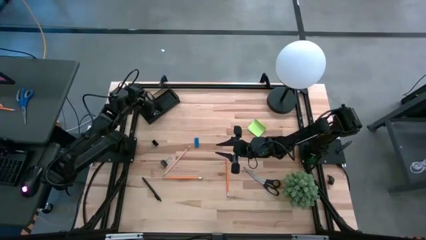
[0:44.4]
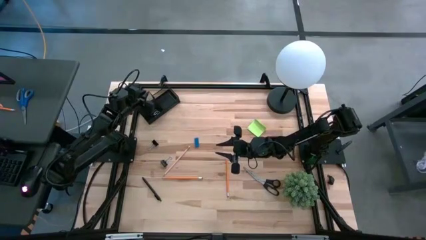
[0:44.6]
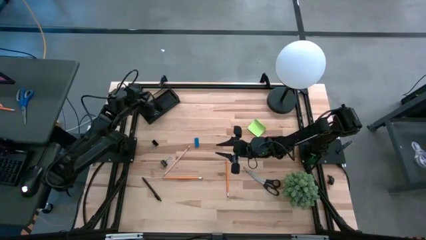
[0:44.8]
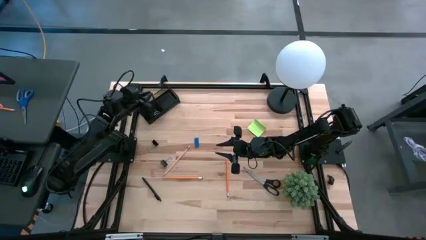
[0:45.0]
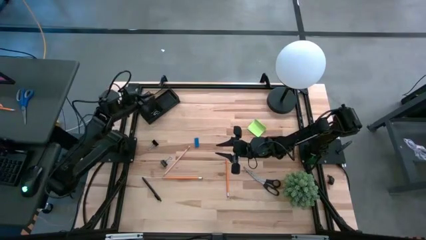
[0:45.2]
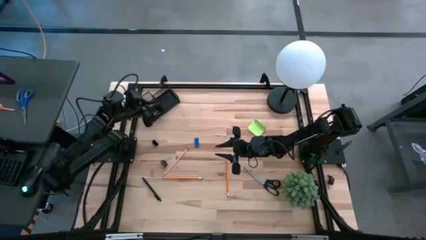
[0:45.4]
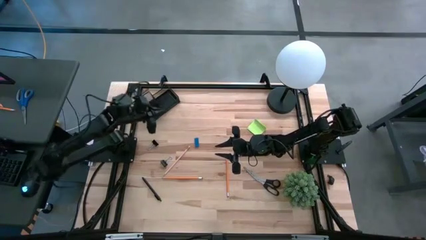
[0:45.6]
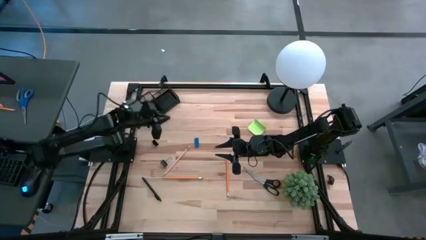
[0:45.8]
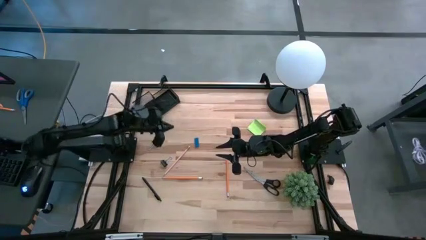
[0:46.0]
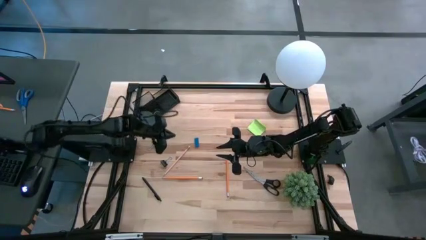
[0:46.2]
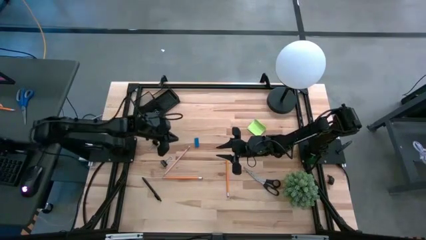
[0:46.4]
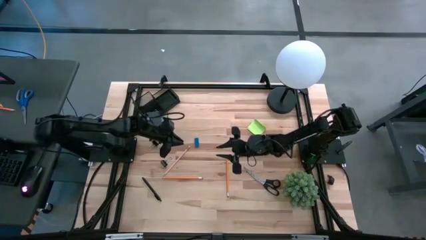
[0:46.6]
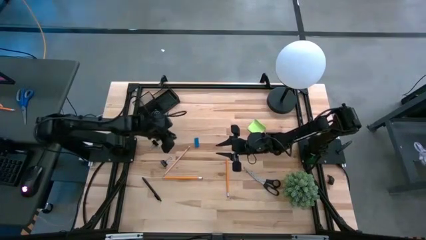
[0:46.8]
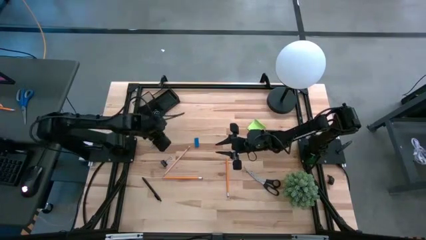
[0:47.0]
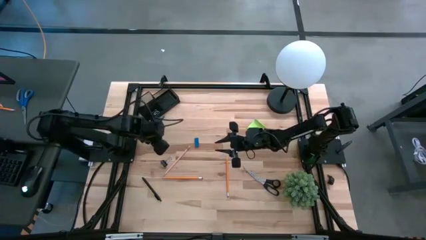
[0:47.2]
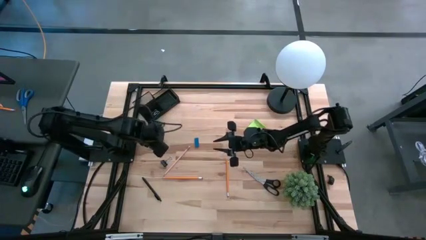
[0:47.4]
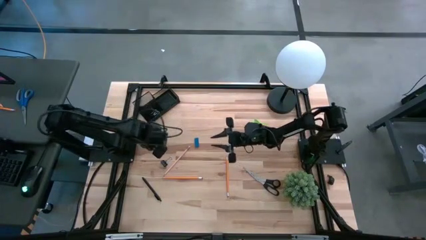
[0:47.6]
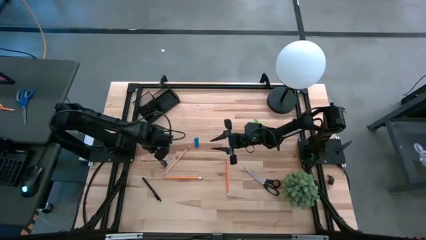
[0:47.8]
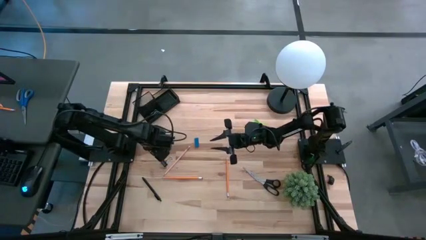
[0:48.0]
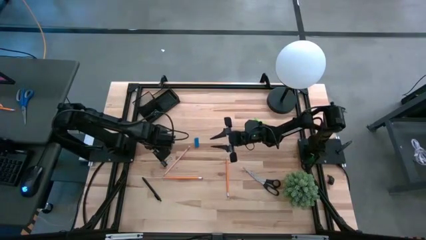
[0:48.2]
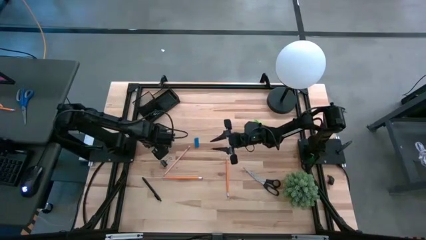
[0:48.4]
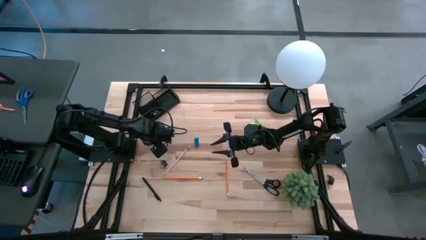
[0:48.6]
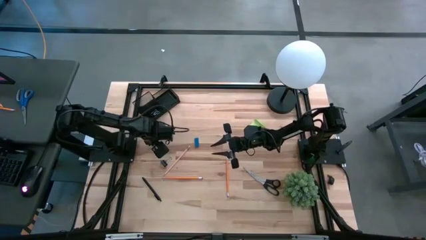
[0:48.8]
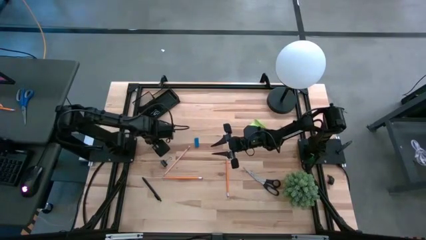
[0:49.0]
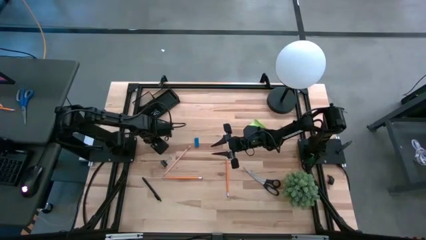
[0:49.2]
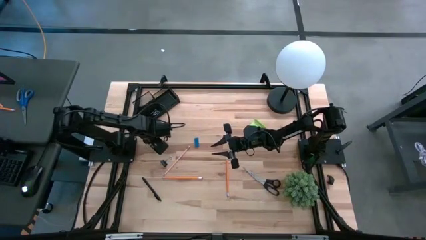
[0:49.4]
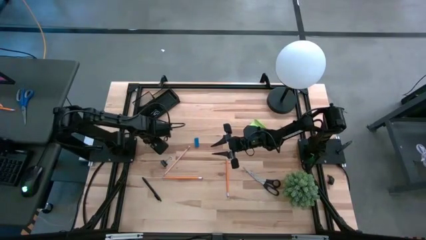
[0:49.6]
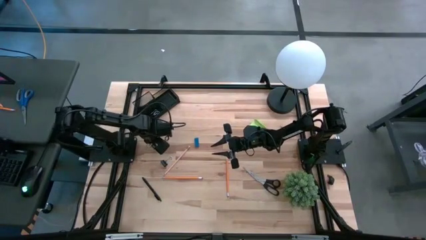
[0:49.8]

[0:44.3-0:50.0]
Task: Pick and place office supplies into organizer
Put the black binder clip into the bottom left section of the desk organizer

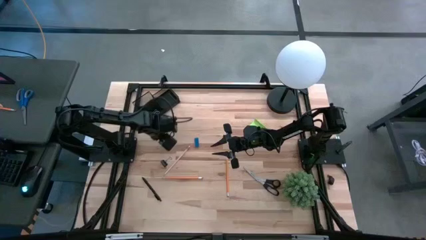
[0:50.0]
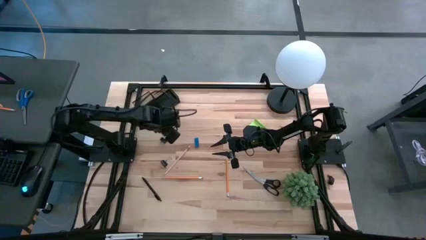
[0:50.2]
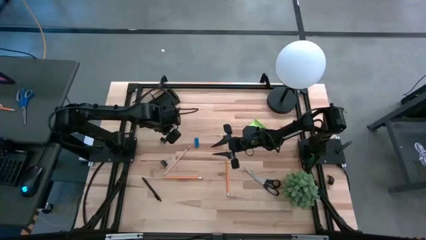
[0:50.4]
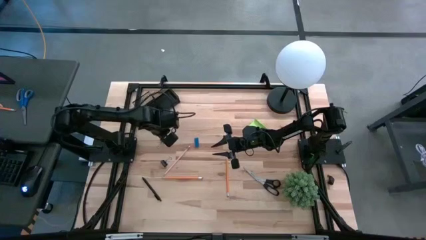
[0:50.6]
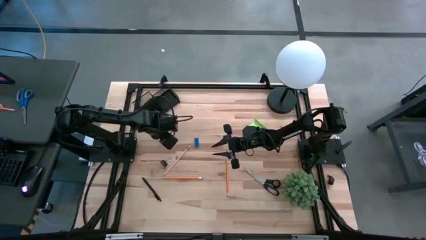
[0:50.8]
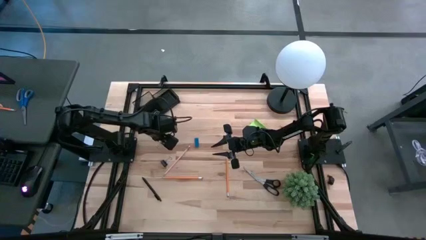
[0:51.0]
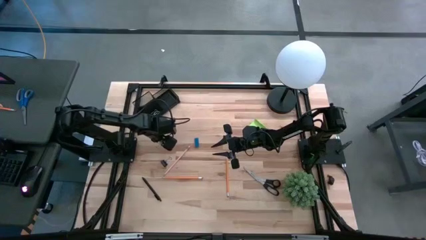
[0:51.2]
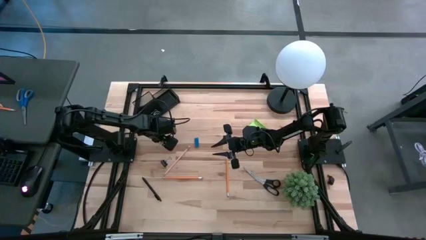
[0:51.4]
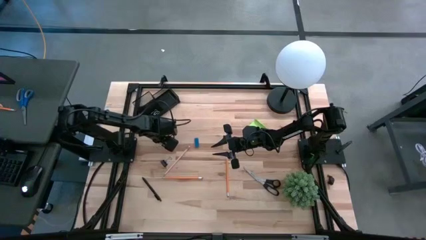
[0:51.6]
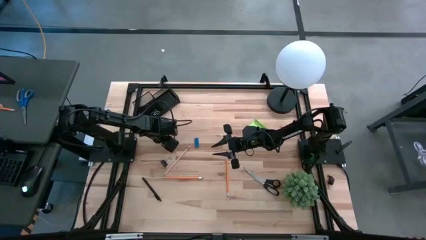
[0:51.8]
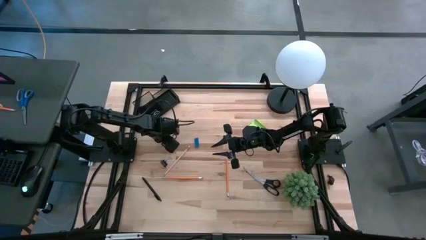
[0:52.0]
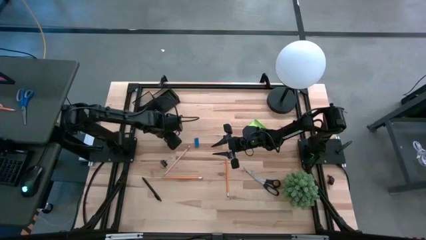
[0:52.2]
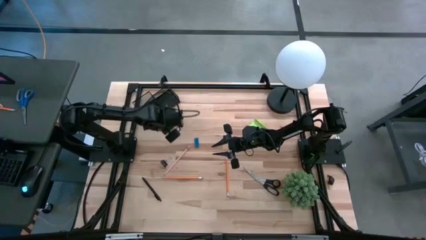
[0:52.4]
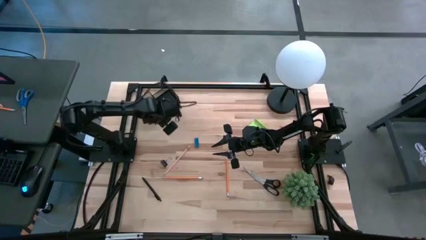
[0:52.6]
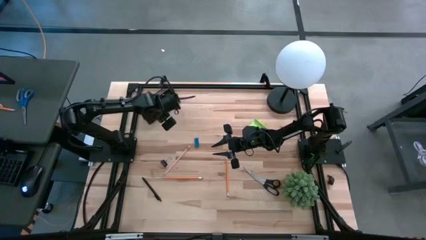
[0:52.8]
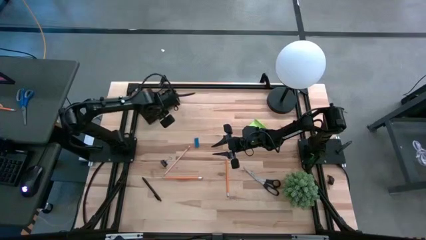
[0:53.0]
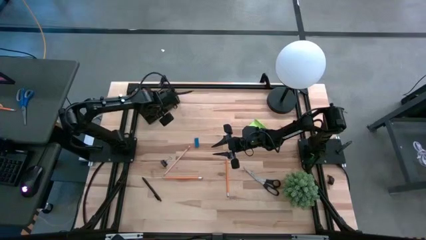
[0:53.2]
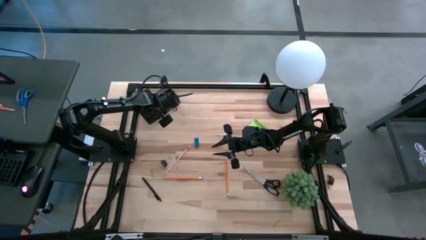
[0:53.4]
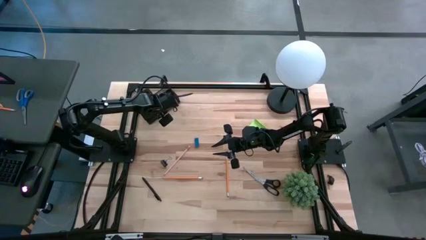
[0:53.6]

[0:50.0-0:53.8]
Put the black binder clip into the bottom left section of the desk organizer
